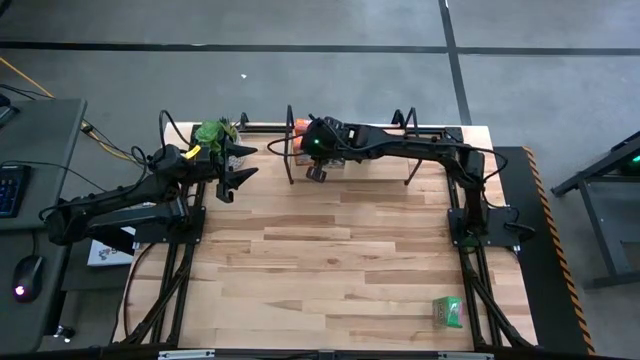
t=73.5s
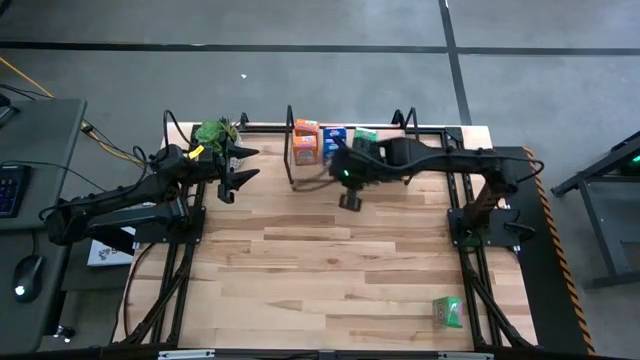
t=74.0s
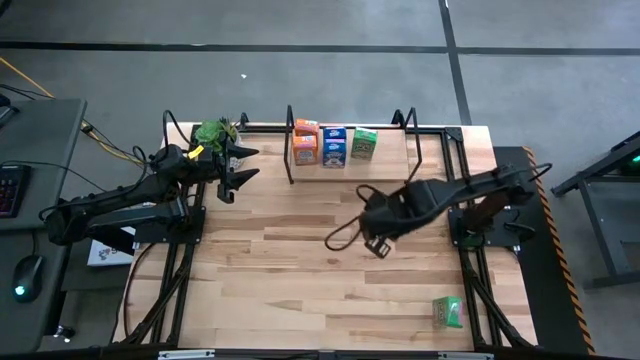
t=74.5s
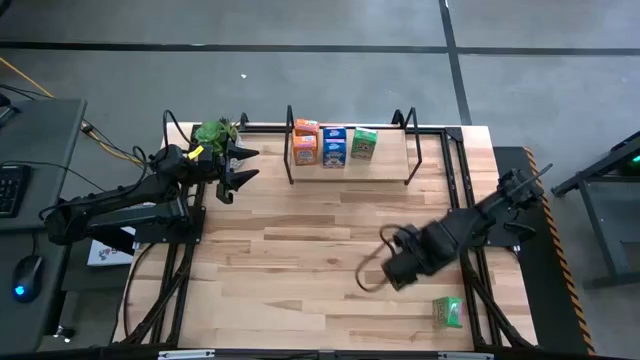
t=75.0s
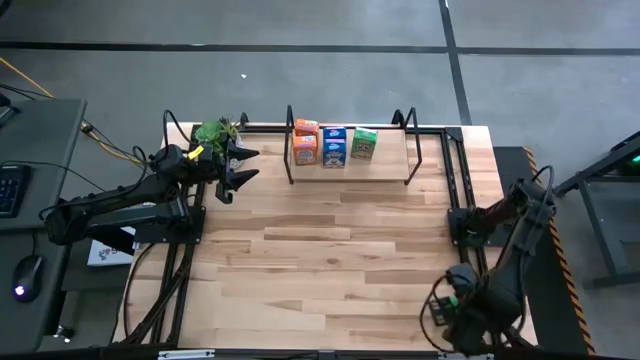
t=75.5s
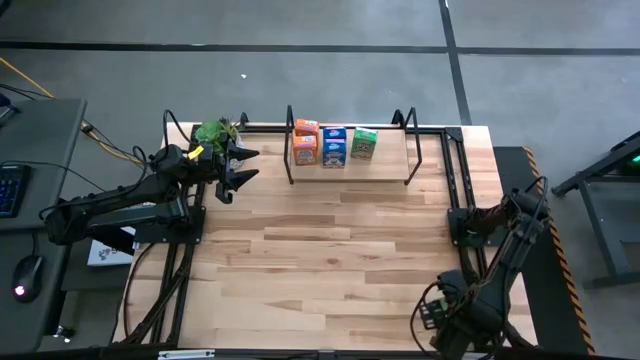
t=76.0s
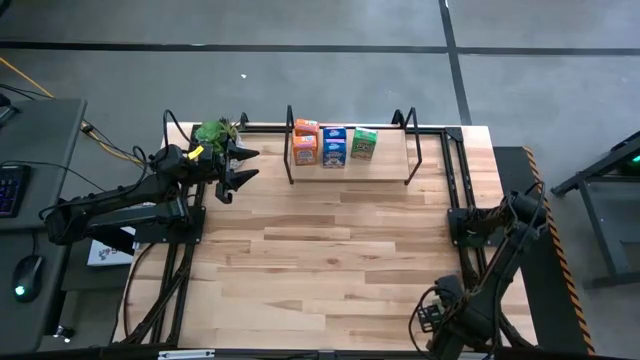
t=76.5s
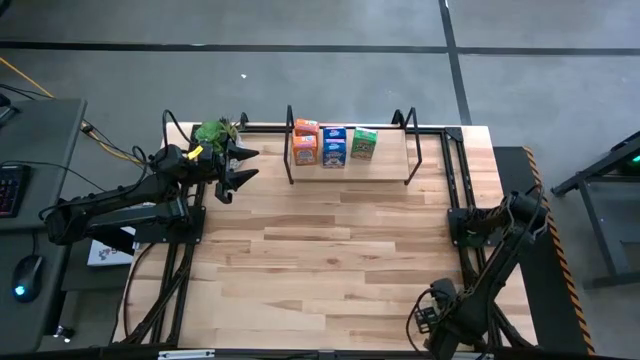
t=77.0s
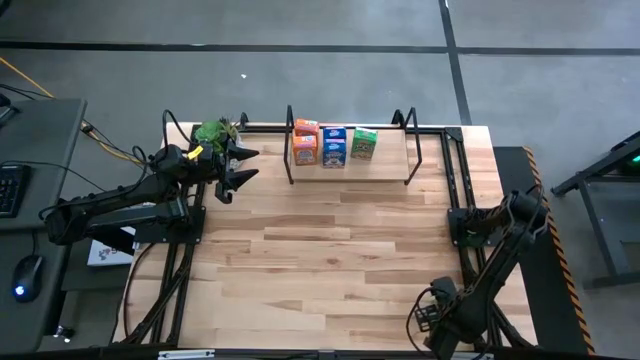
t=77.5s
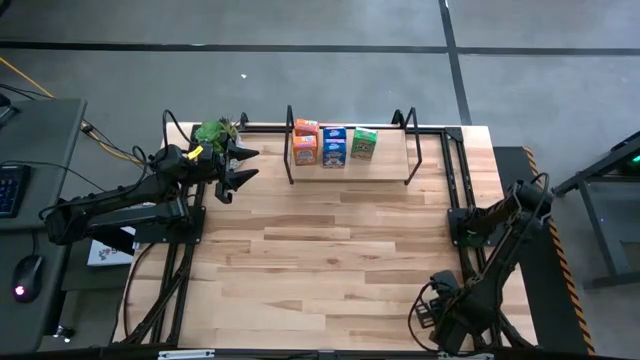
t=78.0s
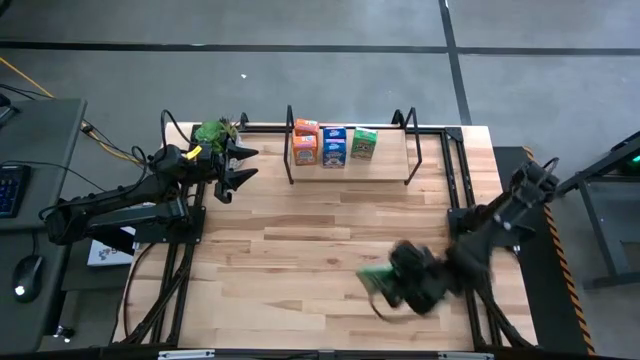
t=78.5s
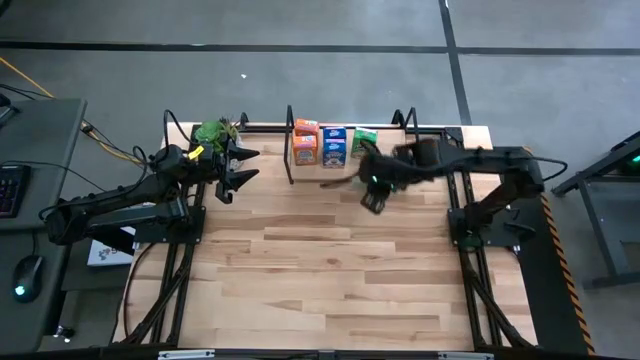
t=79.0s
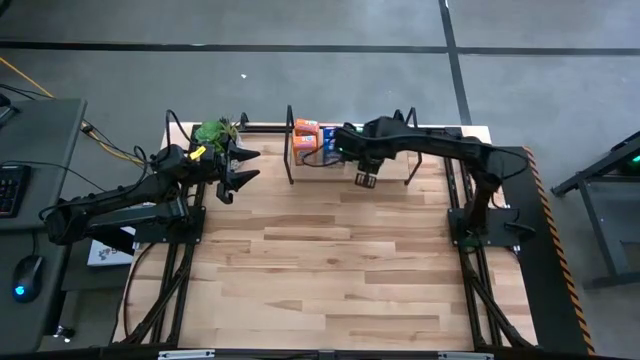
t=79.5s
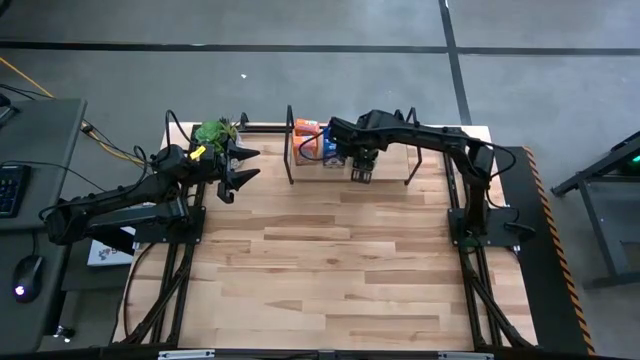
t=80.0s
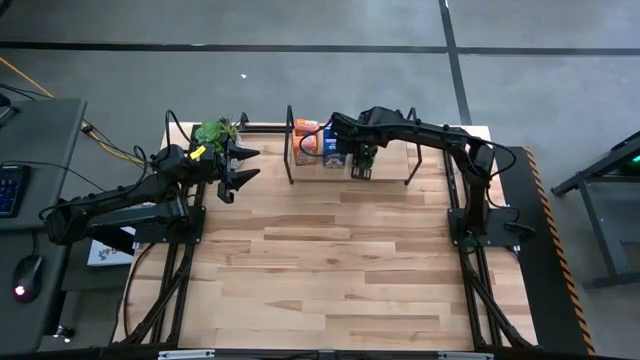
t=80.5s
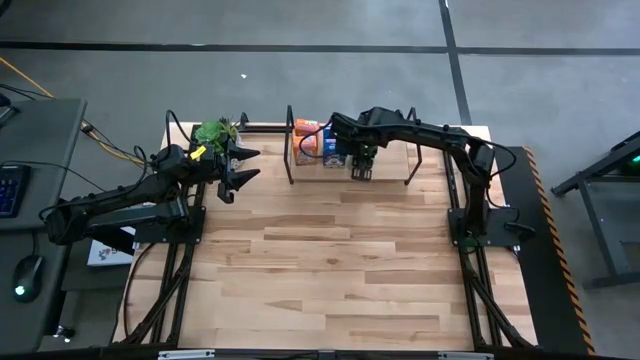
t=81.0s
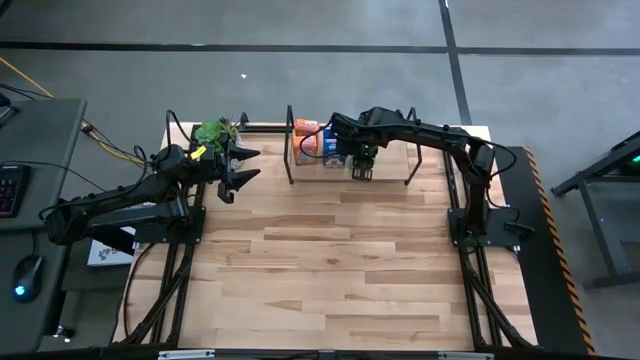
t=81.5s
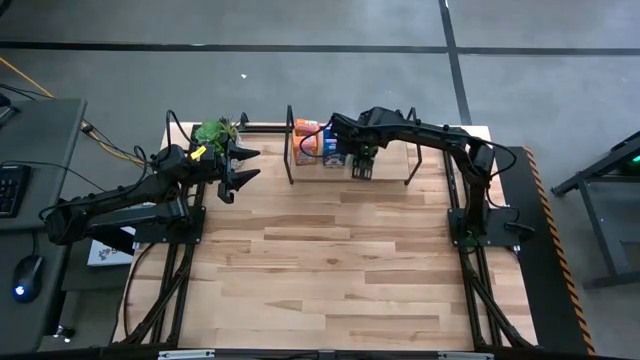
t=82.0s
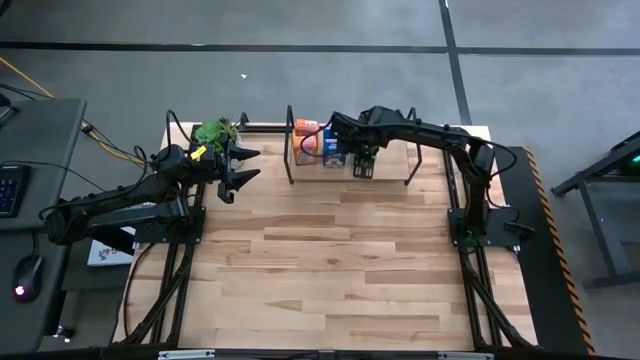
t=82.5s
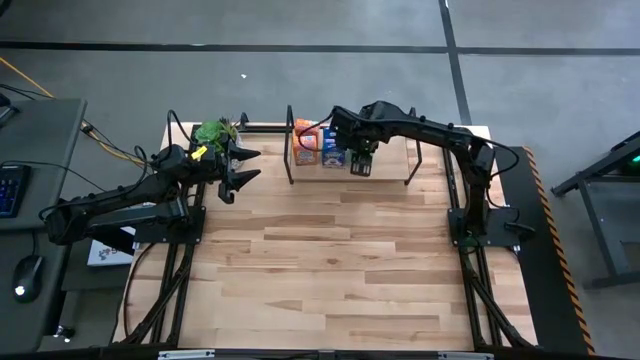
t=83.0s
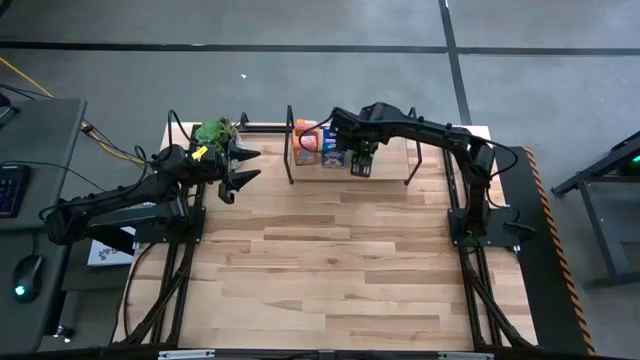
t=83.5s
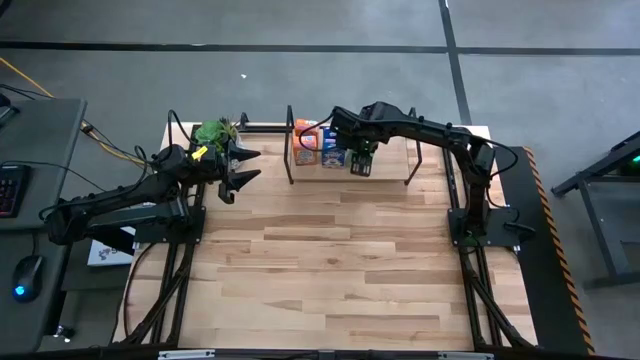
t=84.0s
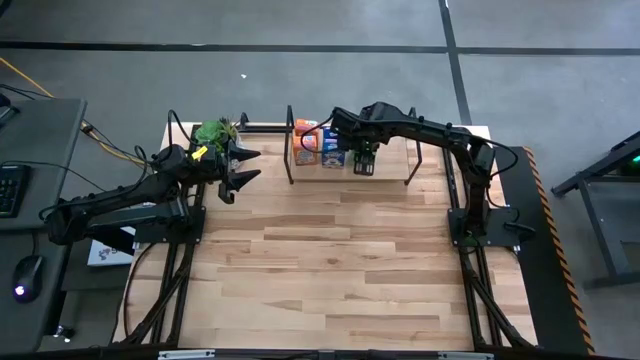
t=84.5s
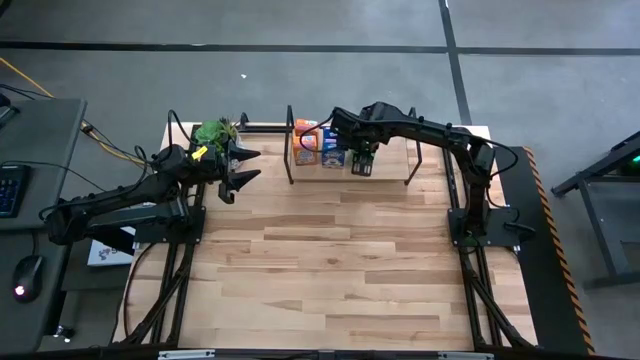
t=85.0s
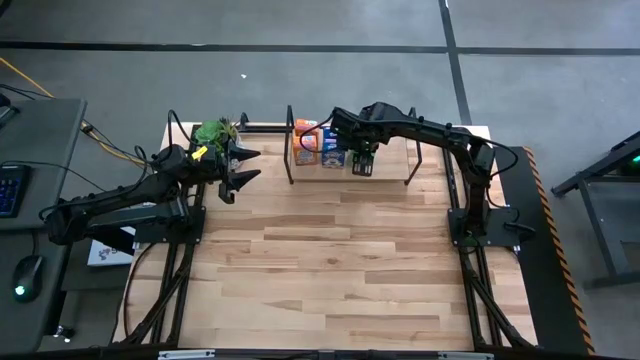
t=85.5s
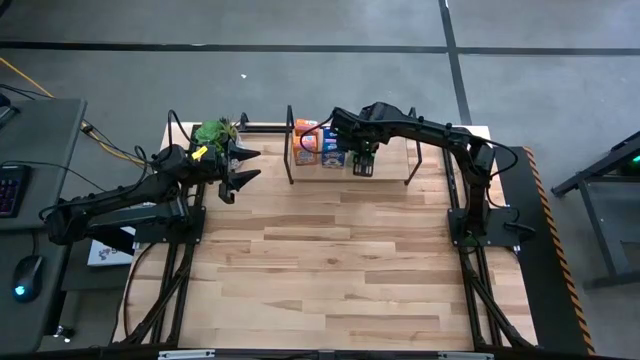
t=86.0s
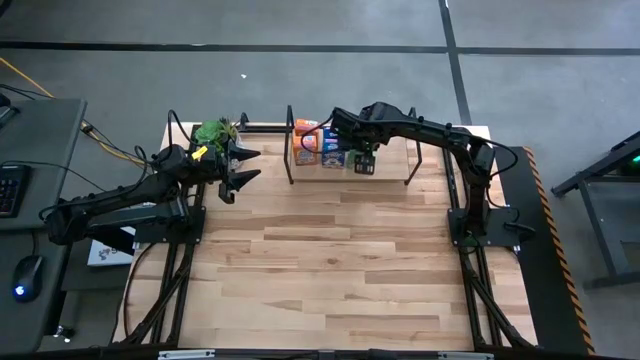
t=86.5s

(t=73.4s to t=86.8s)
Task: Stack cereal on shelf
Put the green cereal box on the shelf aligned with the other green cereal box

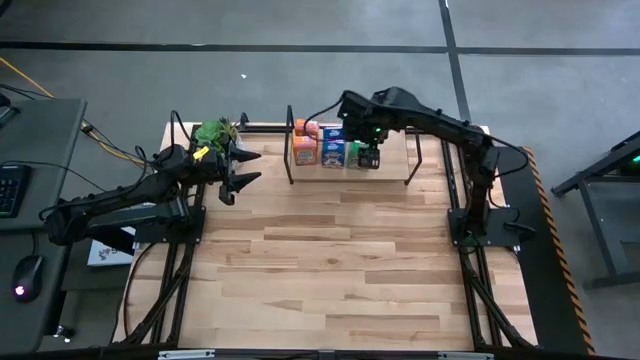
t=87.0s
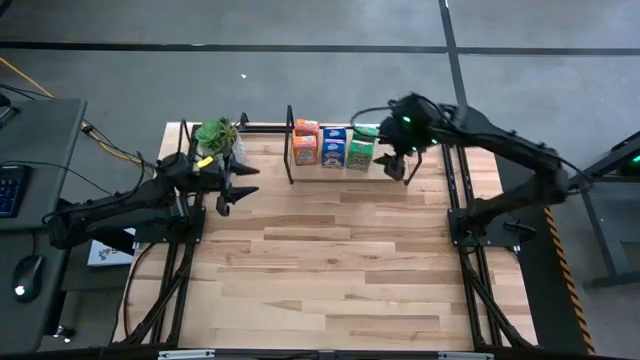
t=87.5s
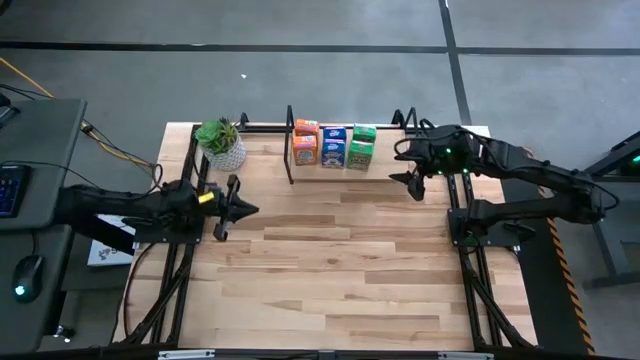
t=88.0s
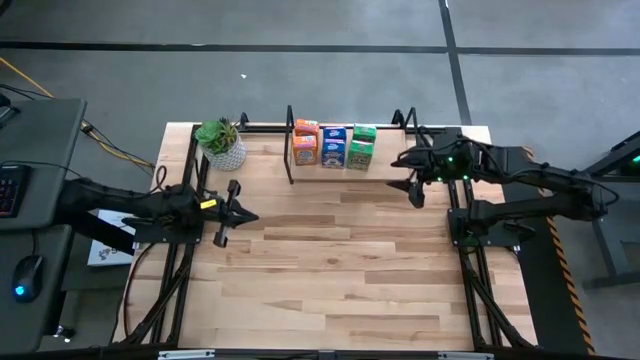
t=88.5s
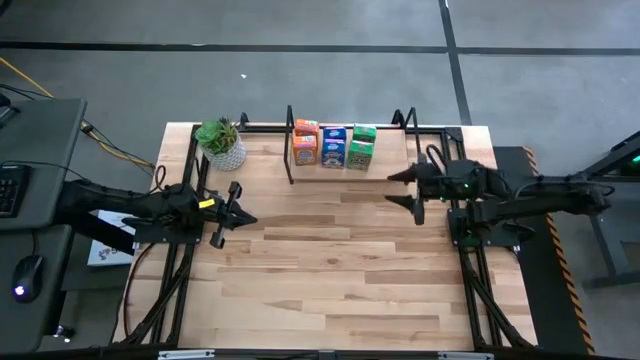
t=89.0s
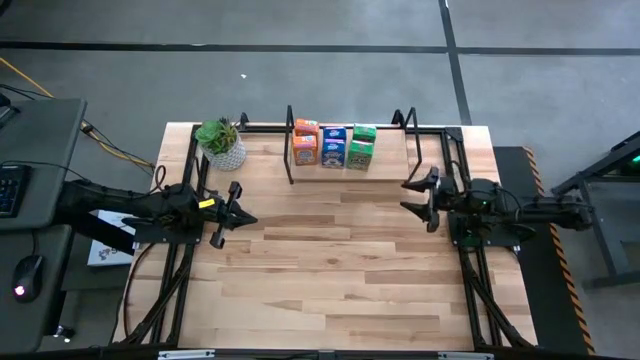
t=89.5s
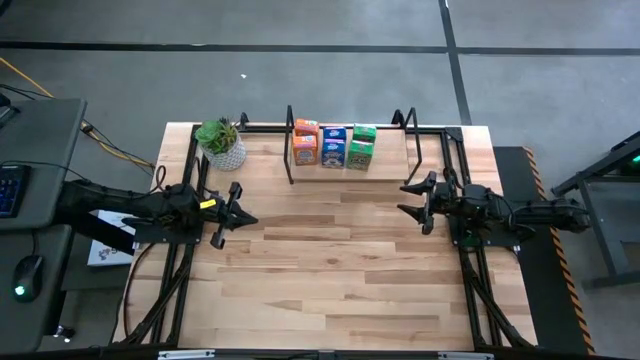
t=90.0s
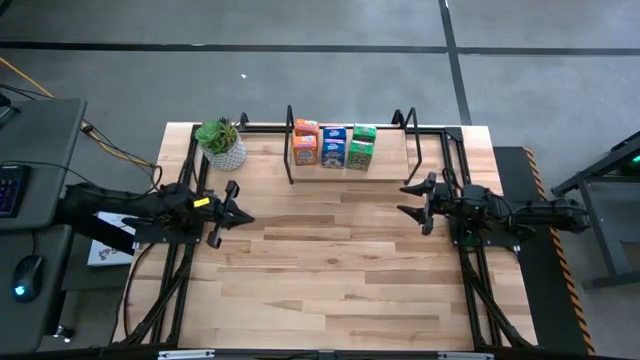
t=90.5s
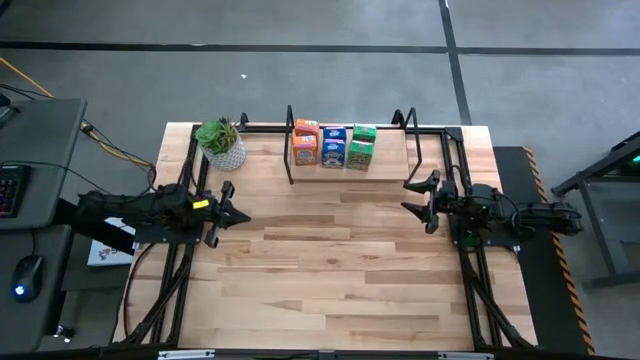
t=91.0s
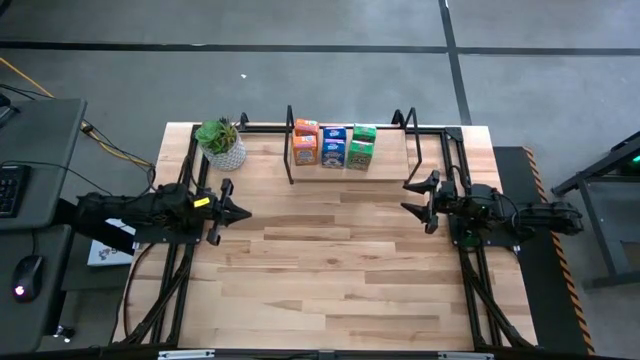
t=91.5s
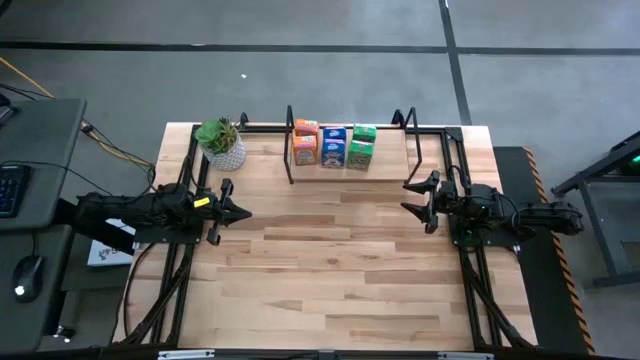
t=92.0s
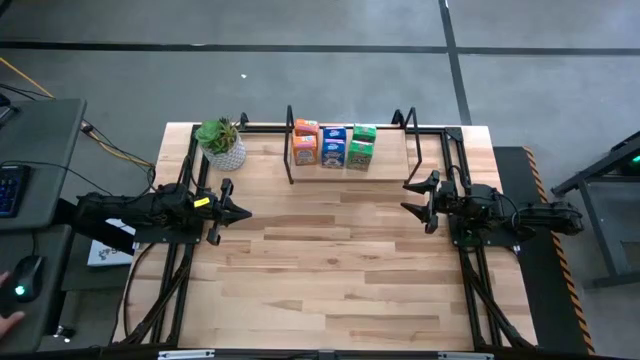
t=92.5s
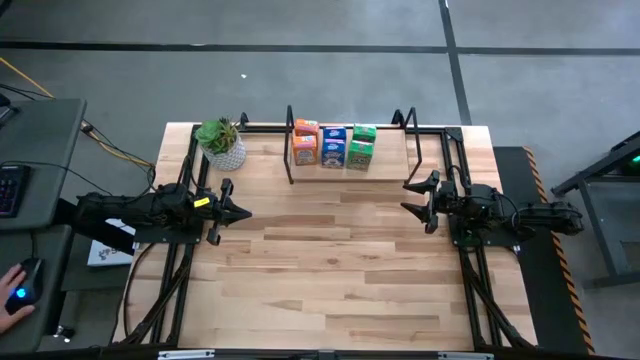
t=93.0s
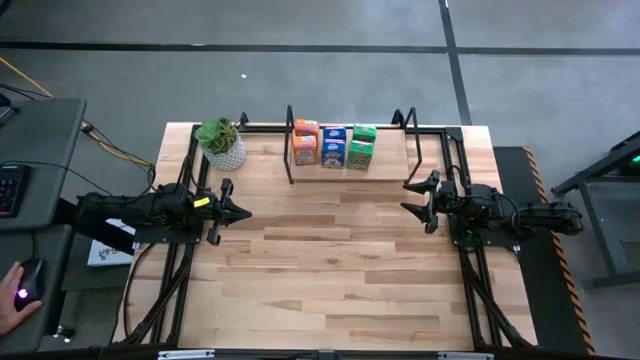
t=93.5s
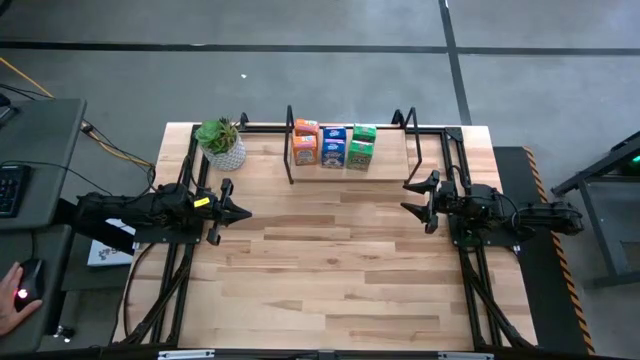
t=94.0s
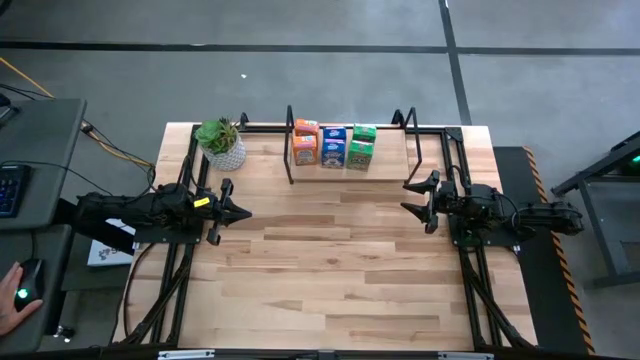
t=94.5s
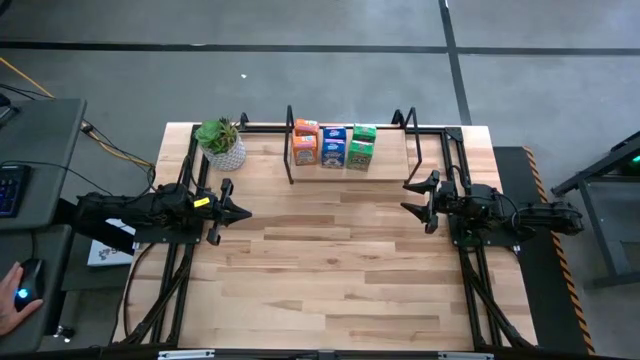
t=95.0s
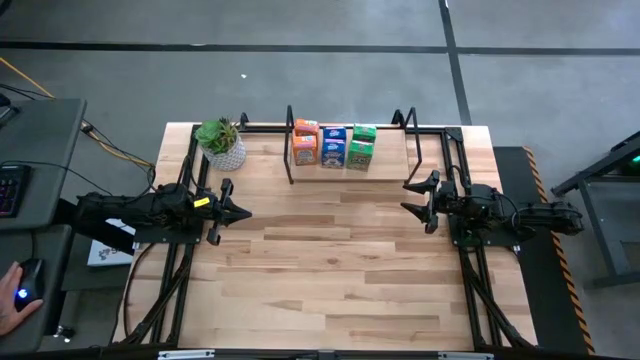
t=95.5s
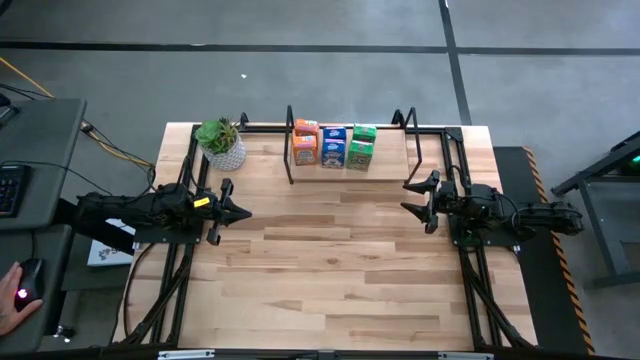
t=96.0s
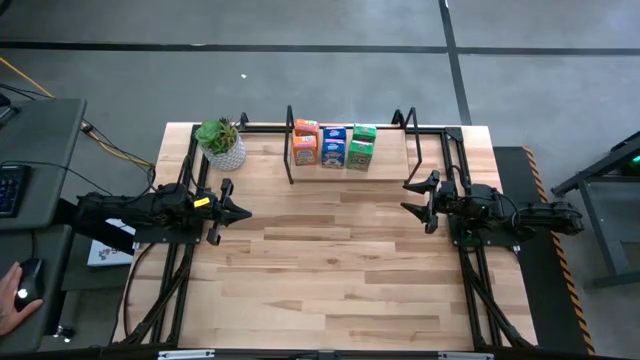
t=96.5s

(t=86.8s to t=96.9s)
Return to Home Position
